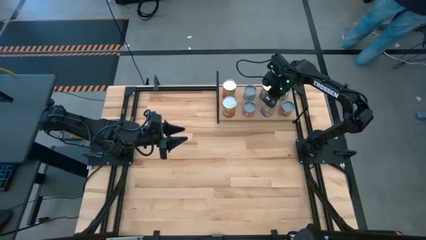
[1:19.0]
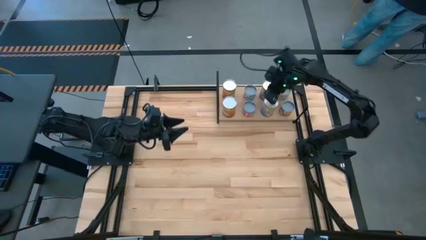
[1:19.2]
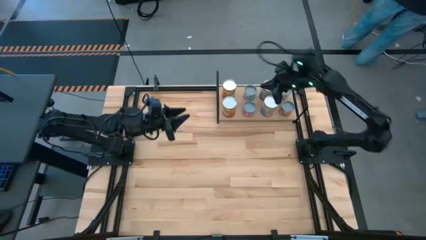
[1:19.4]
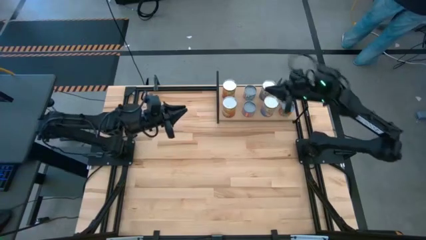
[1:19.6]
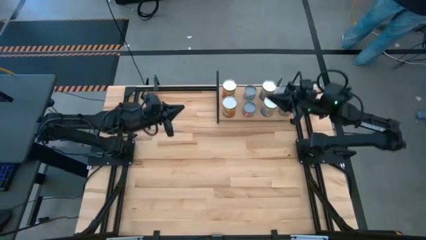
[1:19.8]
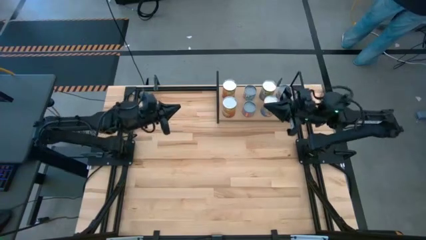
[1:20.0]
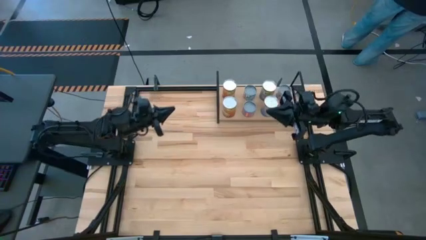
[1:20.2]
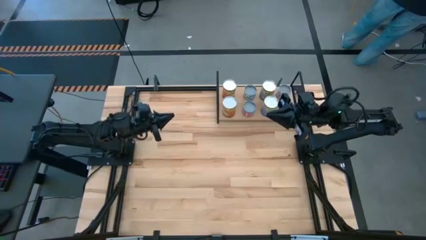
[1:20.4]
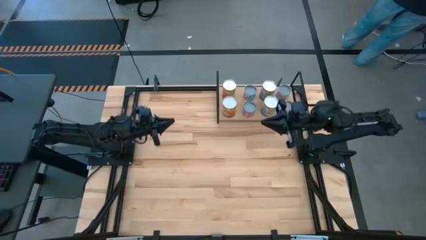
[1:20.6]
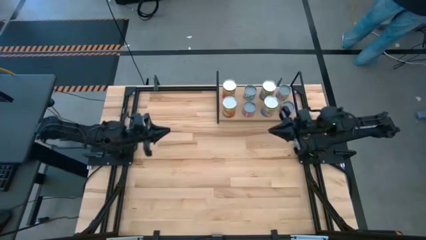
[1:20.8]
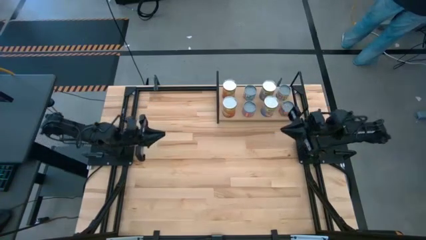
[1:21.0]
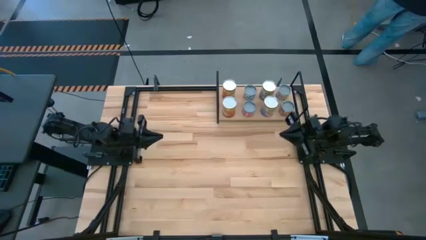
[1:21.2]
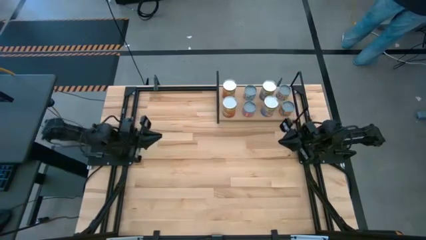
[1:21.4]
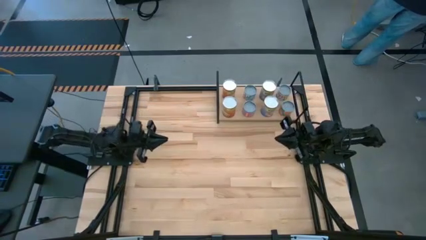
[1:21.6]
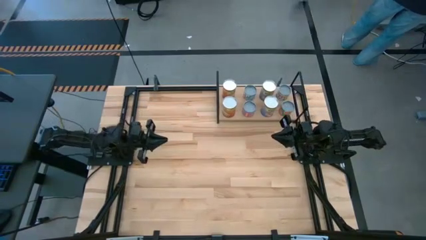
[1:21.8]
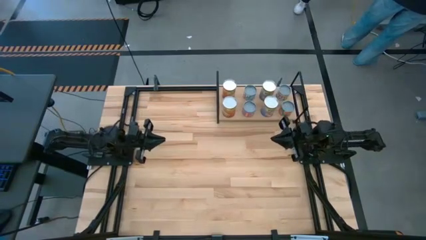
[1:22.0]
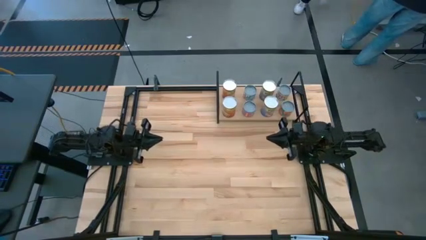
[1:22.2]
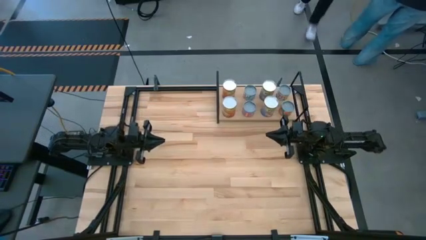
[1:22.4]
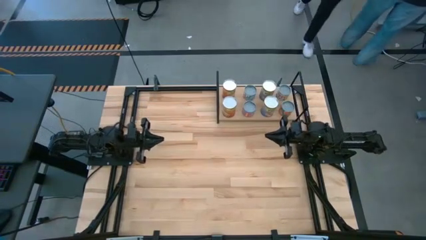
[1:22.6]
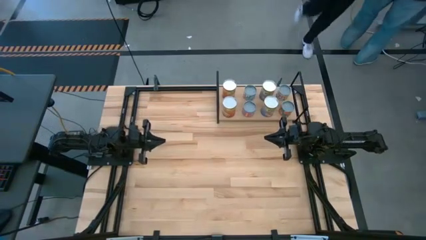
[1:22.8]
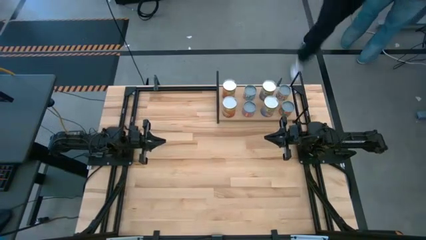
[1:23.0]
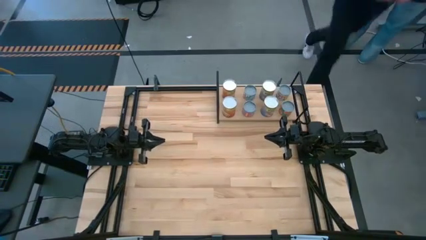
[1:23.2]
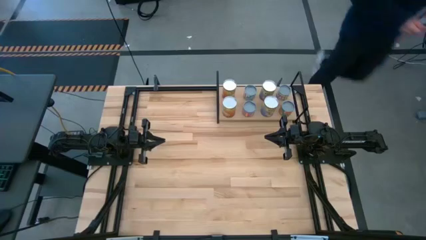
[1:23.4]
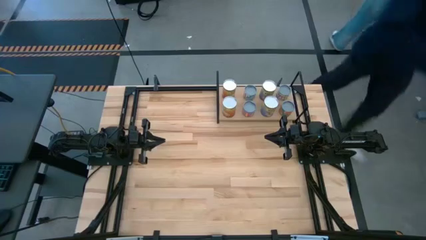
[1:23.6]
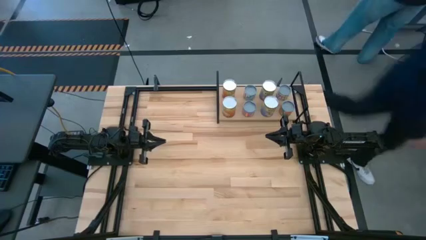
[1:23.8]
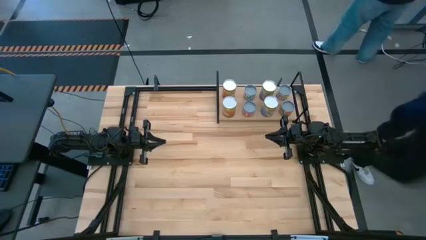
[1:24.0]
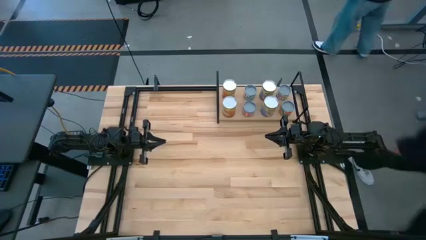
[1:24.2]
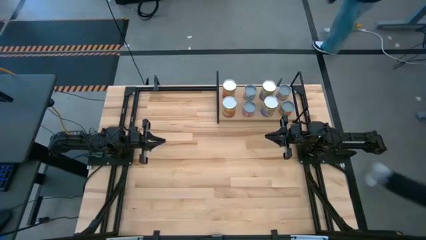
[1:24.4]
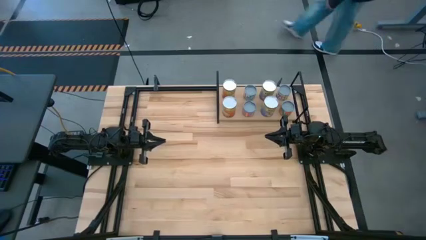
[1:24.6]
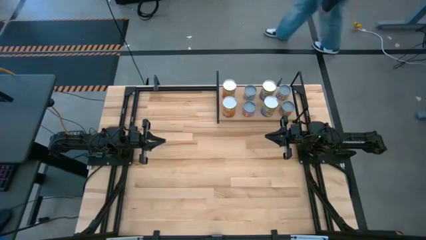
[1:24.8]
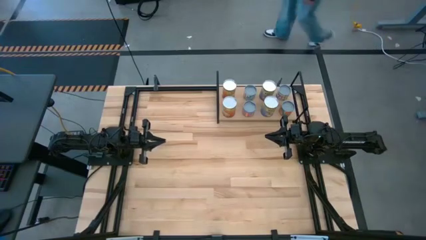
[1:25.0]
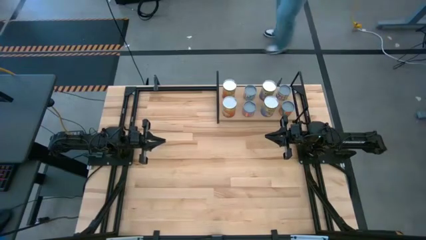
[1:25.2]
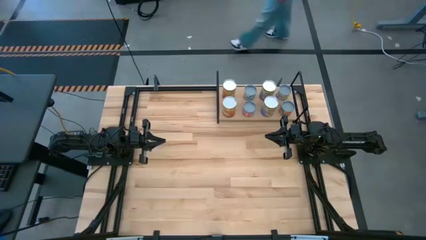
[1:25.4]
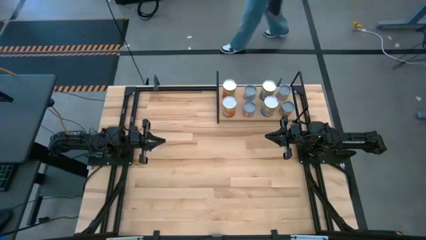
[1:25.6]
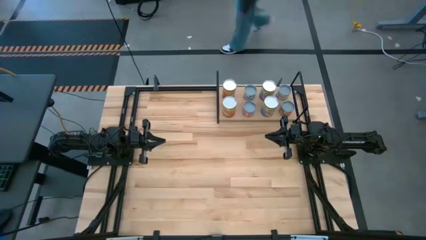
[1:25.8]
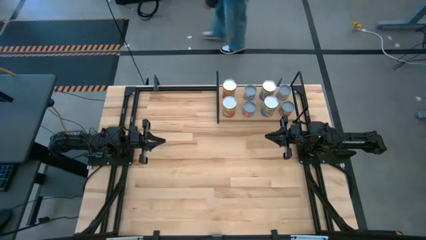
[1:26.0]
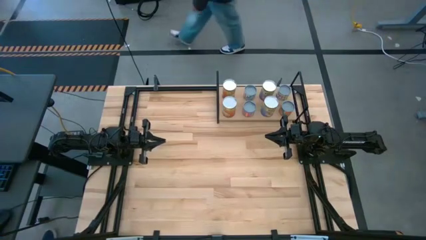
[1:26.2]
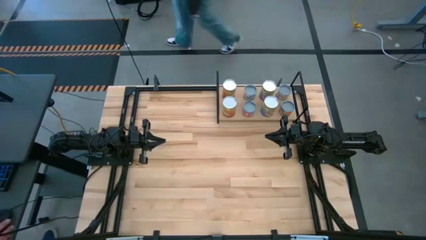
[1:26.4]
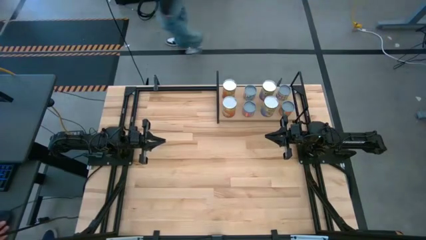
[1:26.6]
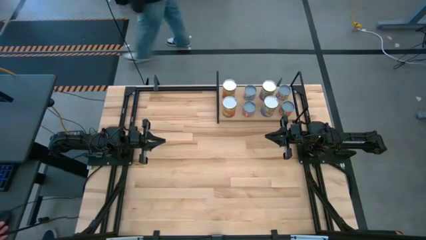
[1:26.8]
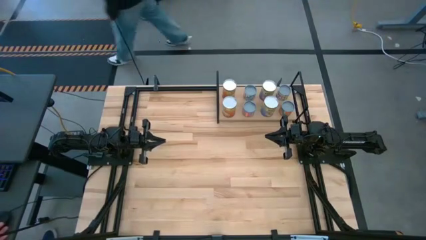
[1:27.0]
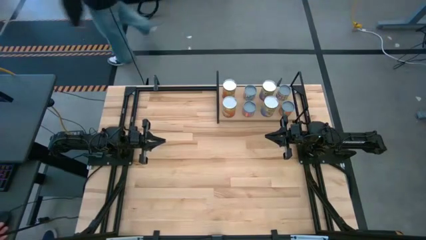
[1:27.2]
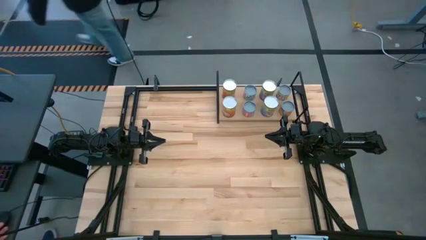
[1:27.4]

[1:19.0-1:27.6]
Task: Pick and place cans onto a shelf
Return to Home Position

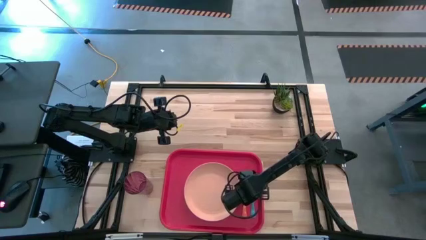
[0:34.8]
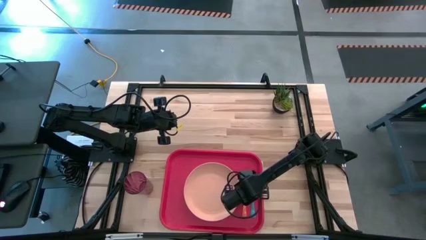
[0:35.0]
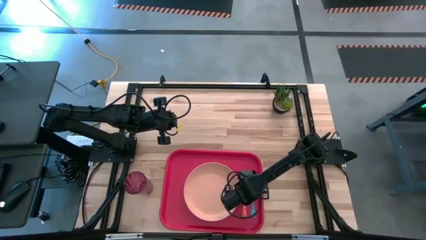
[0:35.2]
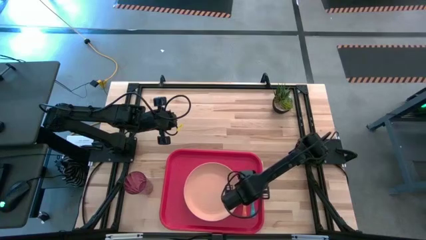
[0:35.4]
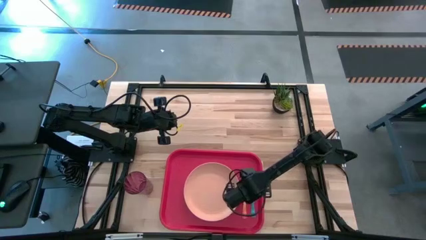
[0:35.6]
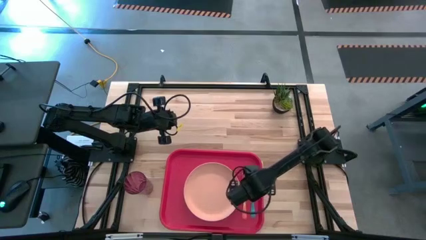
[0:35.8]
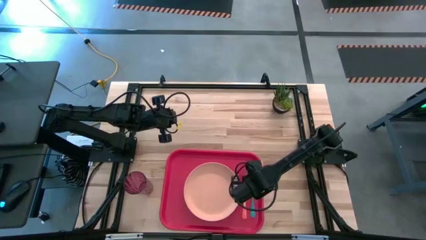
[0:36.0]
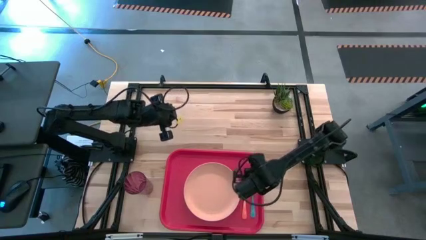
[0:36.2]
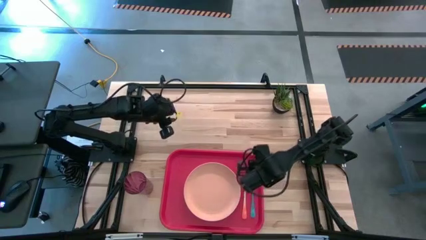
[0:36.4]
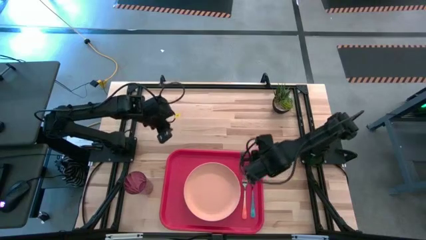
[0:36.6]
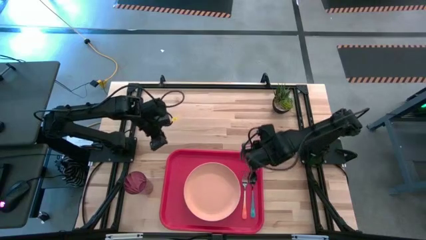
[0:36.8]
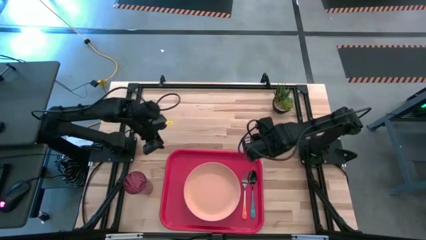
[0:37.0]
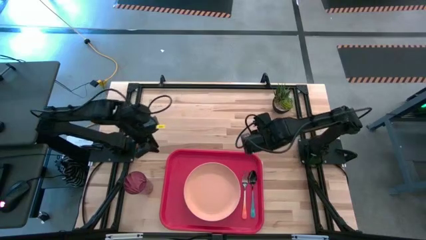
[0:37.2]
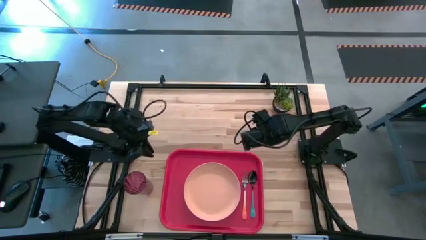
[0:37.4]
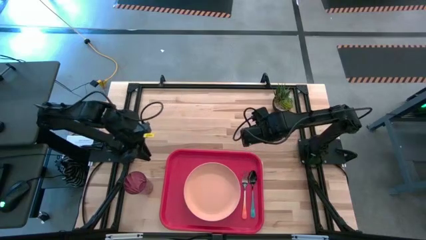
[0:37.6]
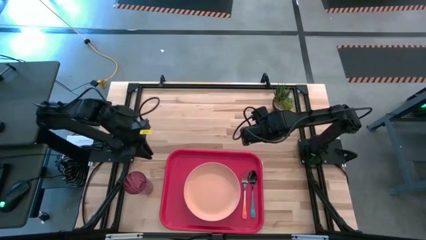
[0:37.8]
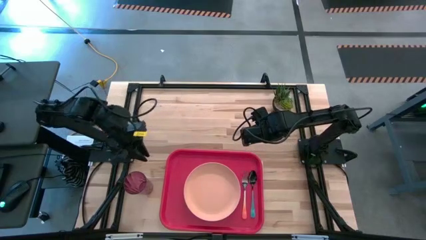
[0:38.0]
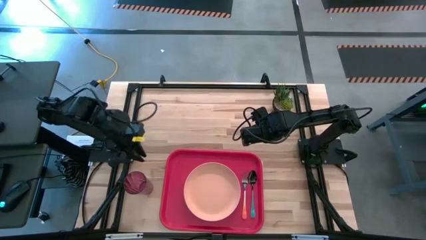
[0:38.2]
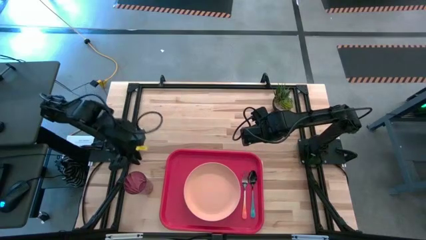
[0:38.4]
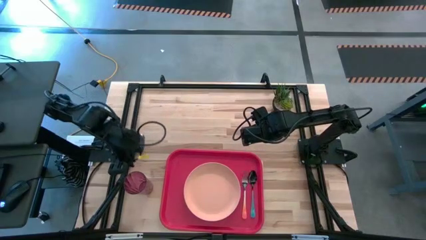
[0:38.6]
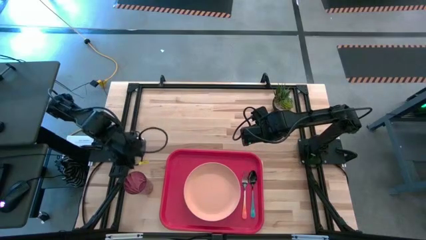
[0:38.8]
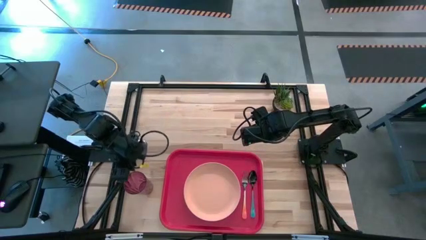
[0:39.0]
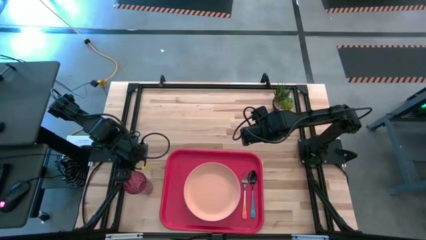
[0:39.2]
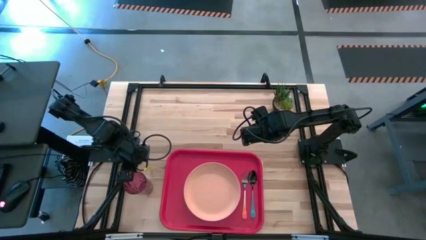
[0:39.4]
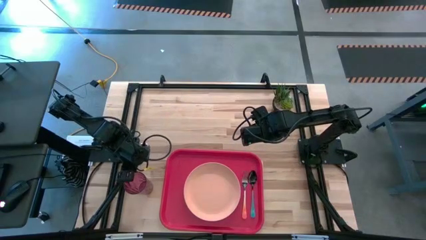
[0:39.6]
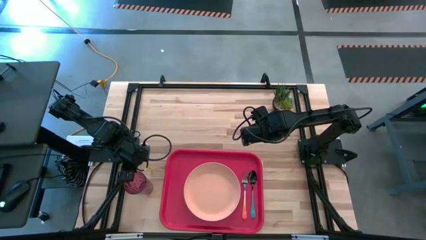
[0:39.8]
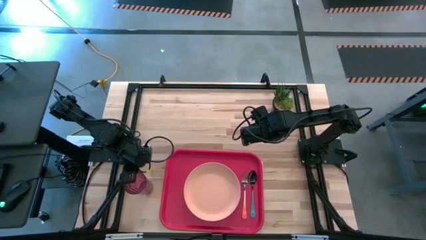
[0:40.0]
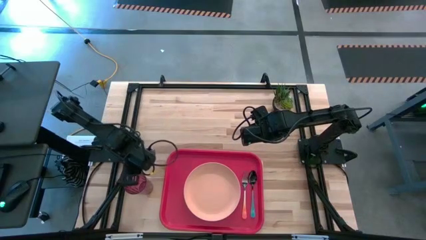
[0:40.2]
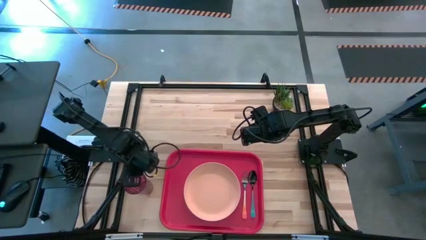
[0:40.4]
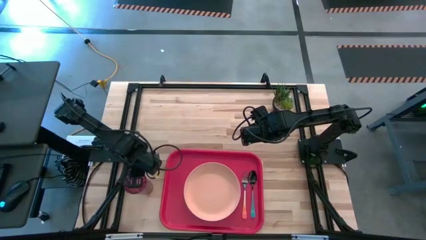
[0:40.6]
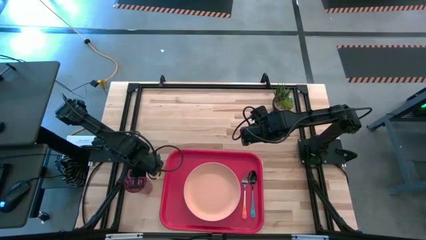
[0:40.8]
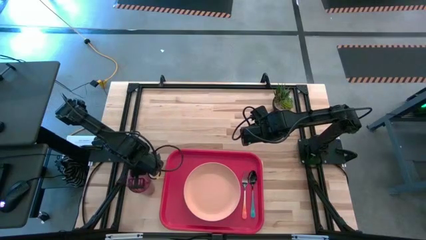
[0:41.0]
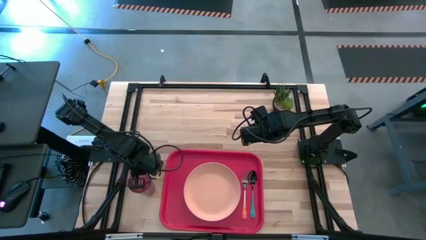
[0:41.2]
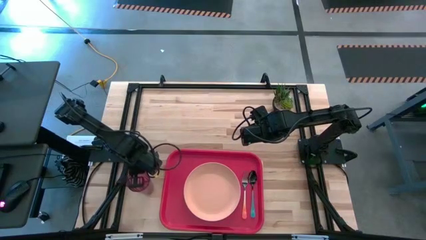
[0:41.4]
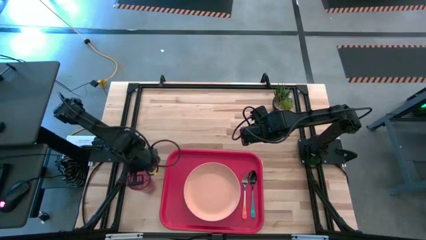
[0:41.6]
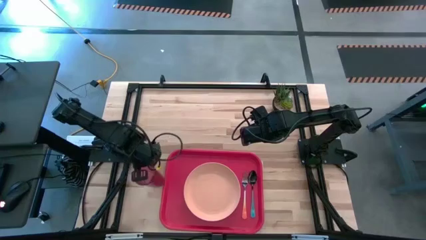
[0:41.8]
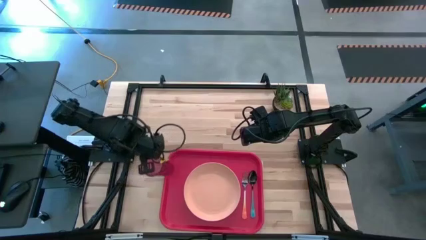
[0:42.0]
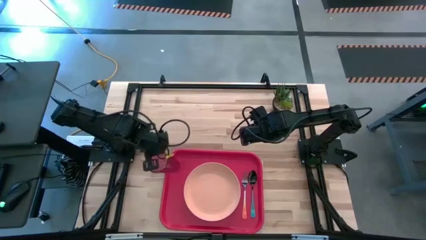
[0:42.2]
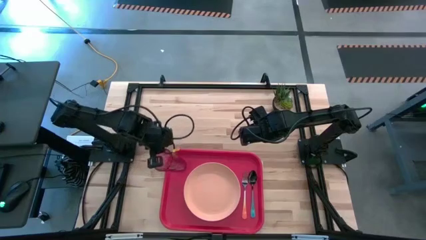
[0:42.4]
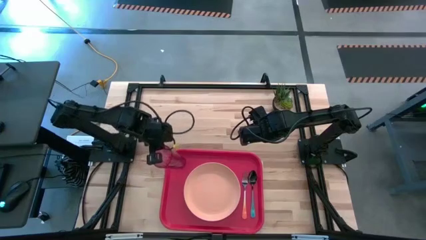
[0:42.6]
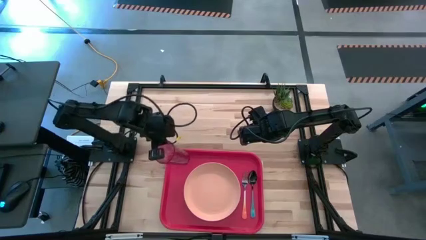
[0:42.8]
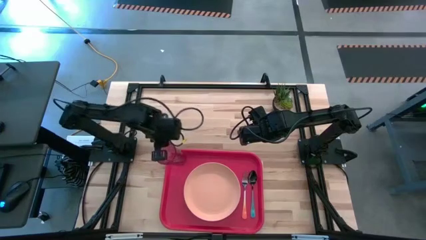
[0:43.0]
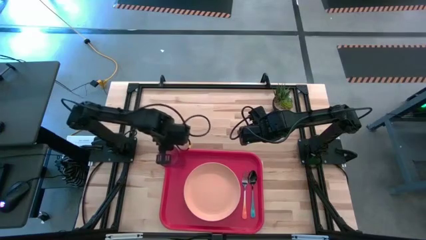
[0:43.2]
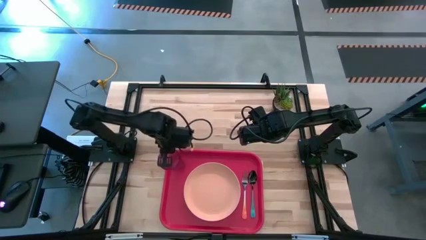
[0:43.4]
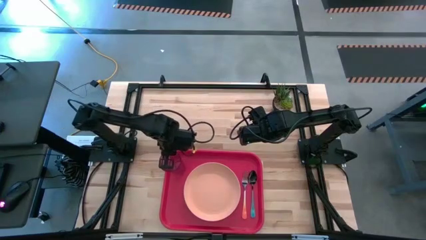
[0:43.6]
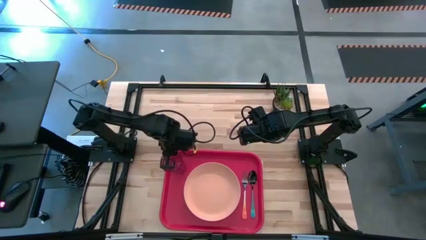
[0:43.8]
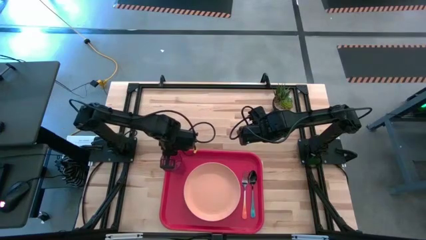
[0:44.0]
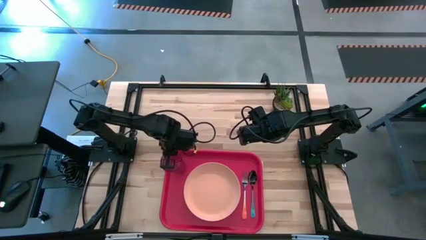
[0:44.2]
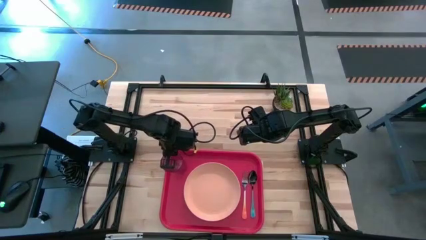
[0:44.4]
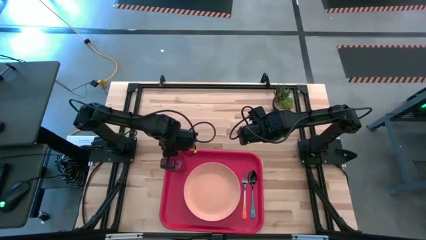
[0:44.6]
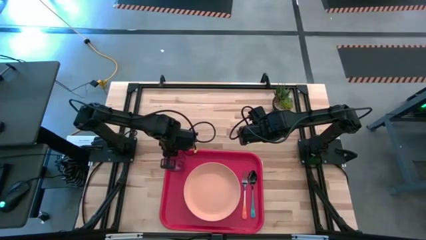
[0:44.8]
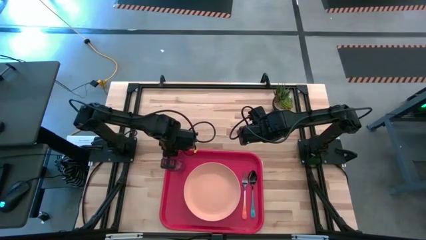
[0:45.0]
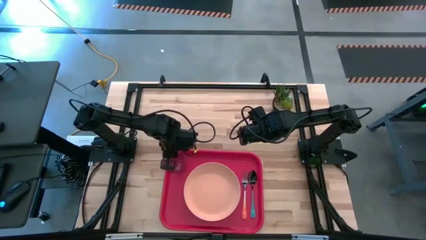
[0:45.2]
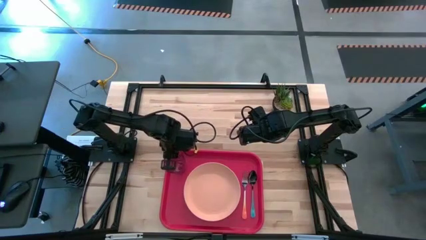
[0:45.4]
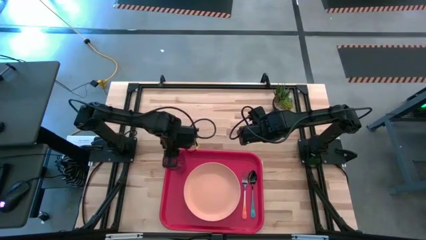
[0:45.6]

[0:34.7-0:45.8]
Task: Pick and place plate/cup/fork/spoon on tray
Put the purple cup on the red serving tray
